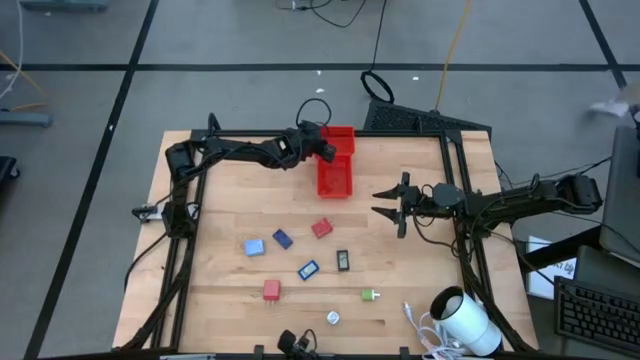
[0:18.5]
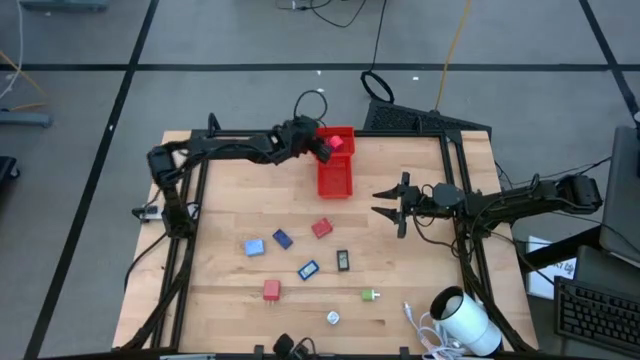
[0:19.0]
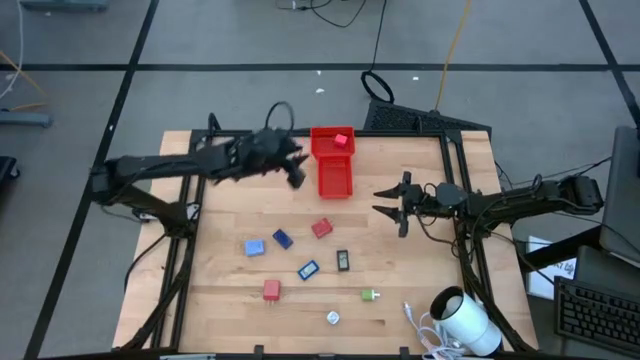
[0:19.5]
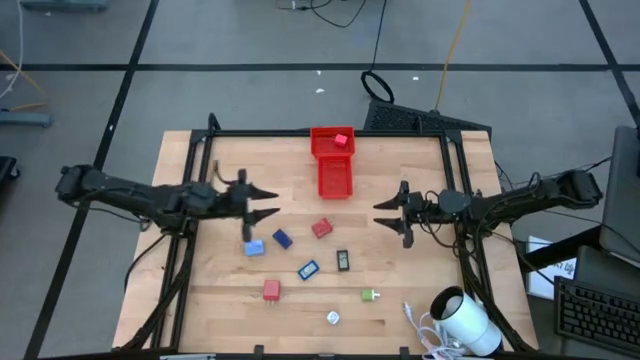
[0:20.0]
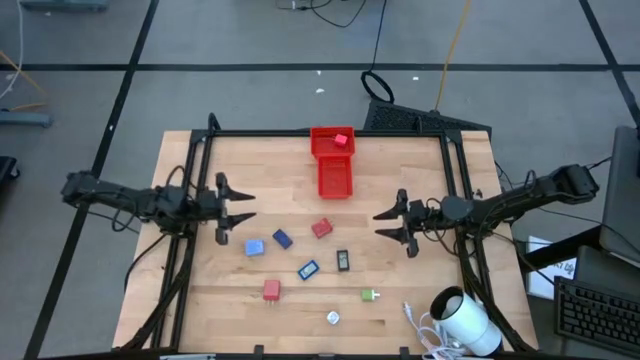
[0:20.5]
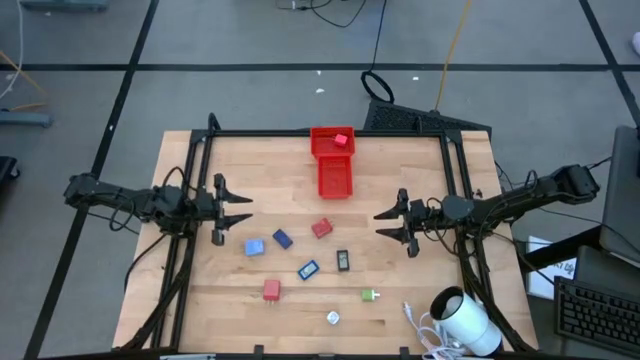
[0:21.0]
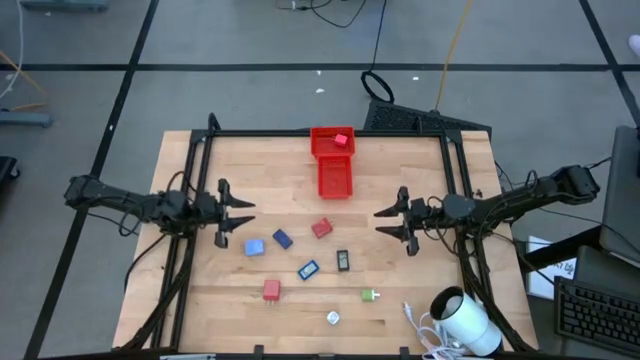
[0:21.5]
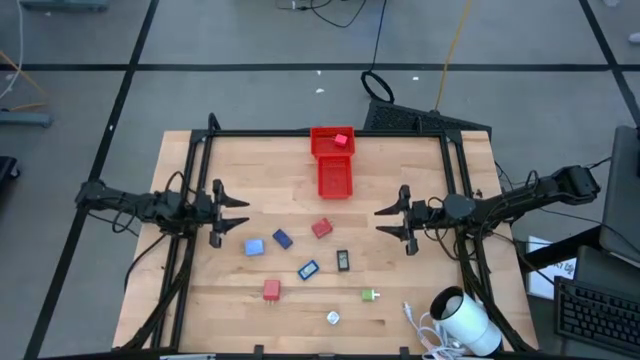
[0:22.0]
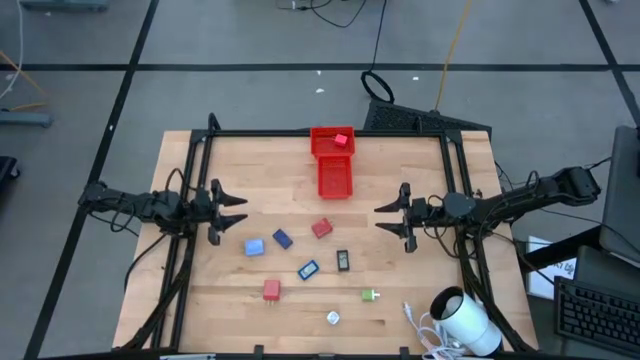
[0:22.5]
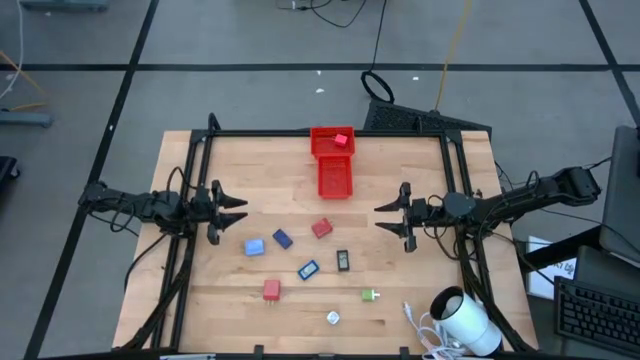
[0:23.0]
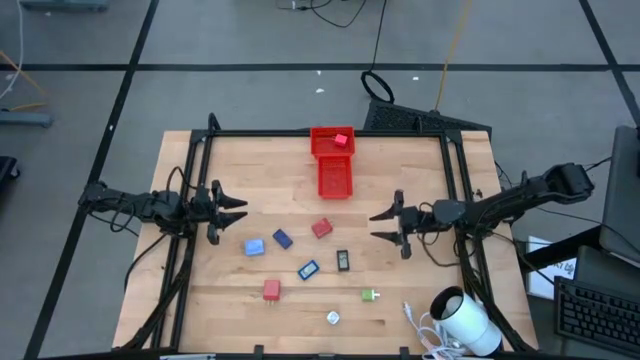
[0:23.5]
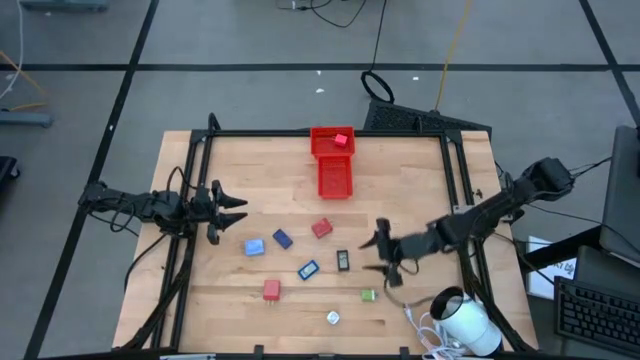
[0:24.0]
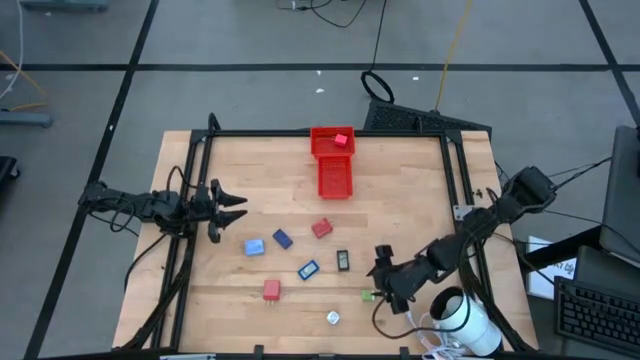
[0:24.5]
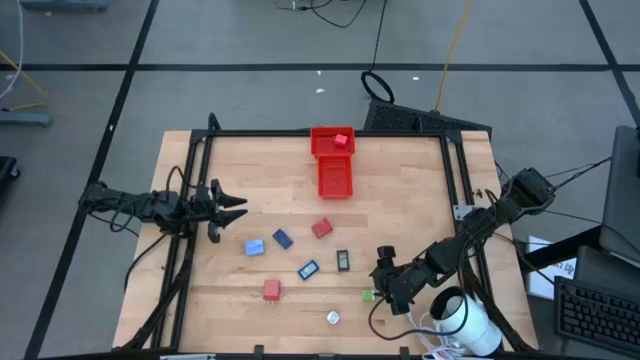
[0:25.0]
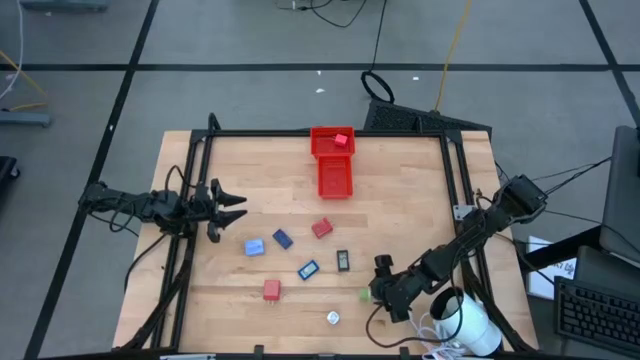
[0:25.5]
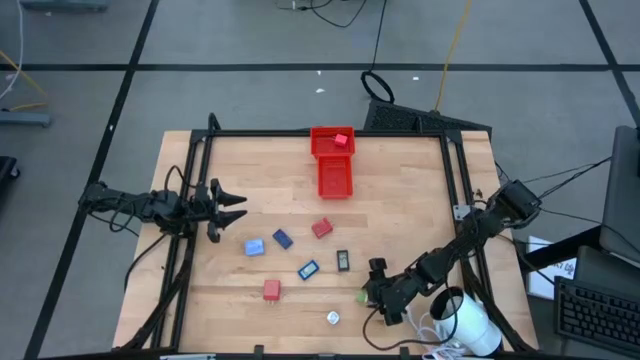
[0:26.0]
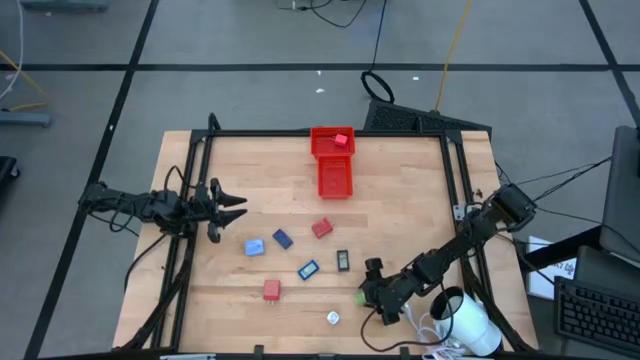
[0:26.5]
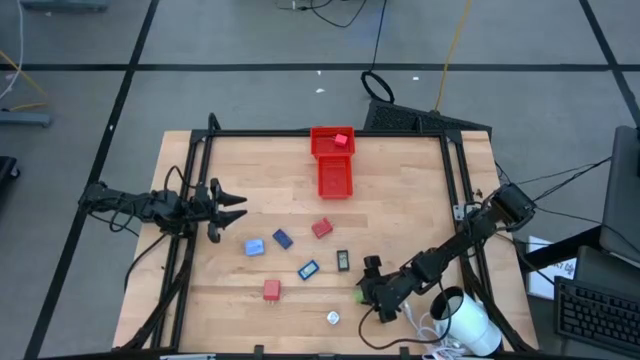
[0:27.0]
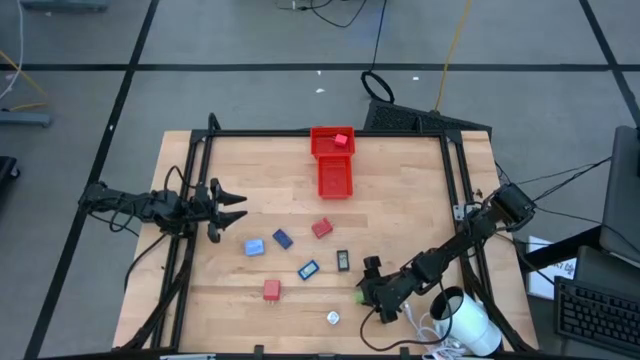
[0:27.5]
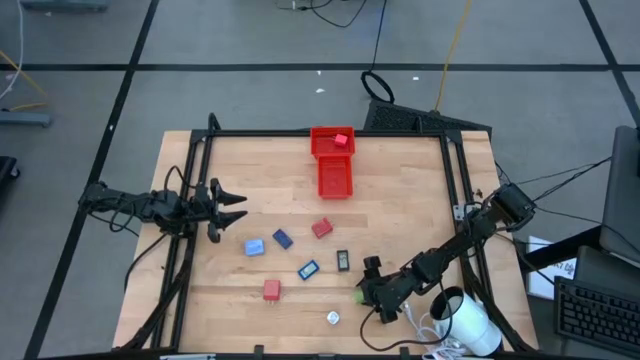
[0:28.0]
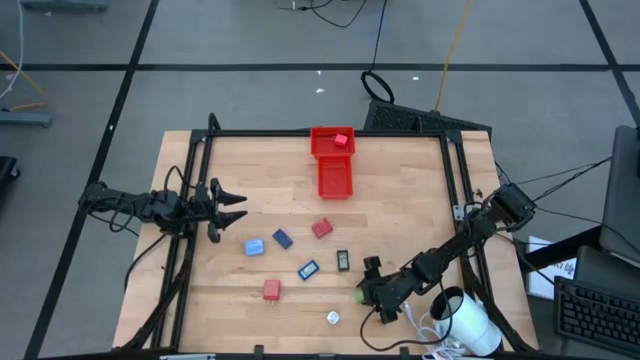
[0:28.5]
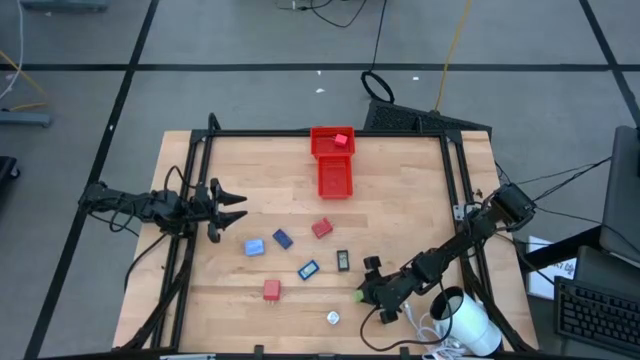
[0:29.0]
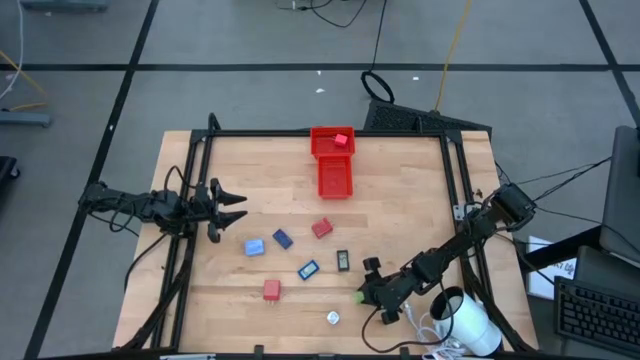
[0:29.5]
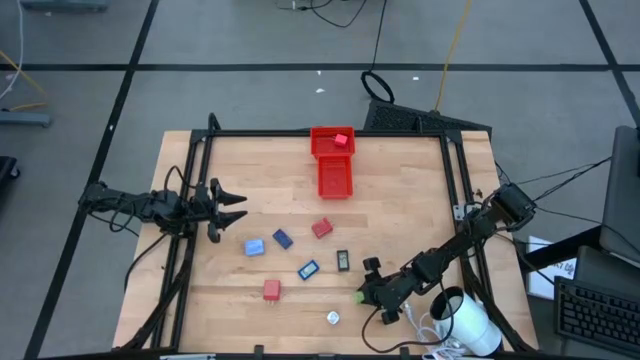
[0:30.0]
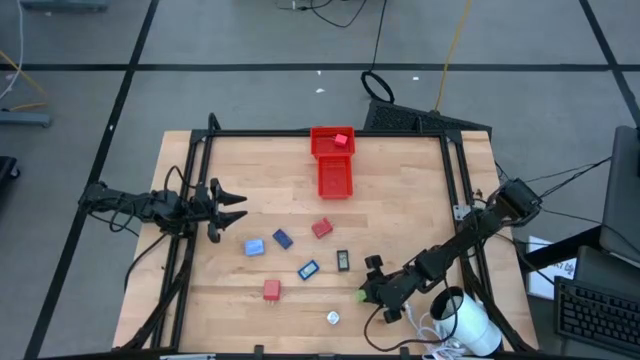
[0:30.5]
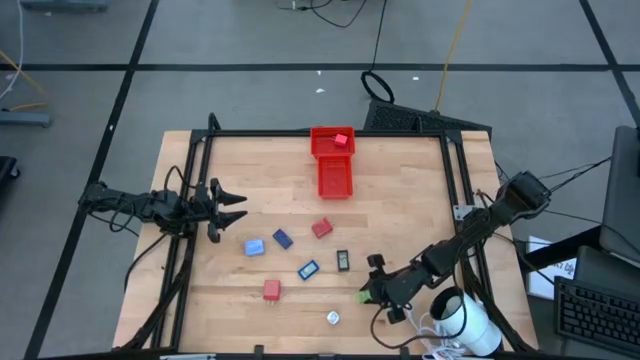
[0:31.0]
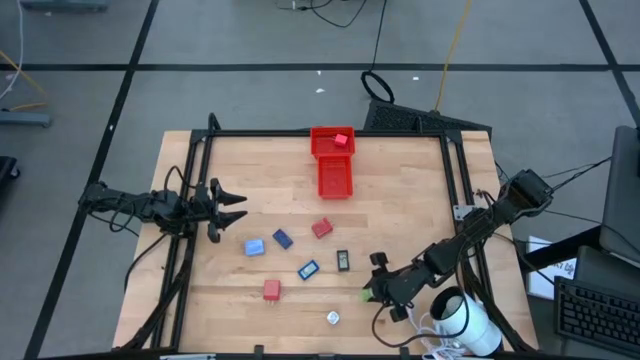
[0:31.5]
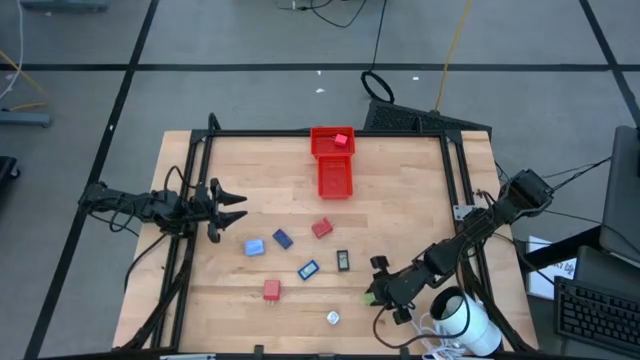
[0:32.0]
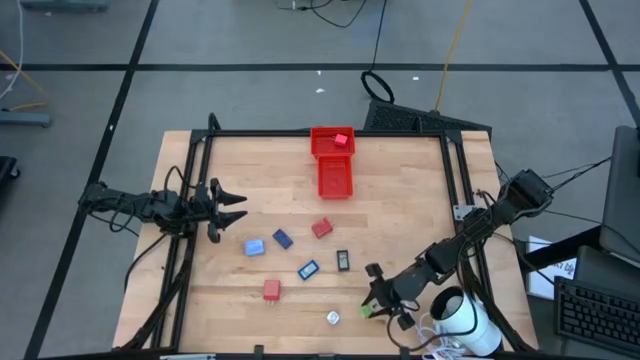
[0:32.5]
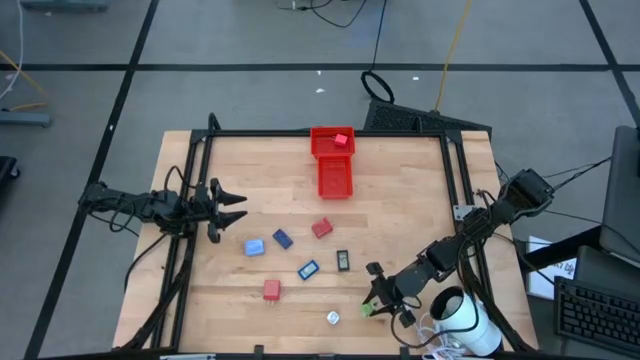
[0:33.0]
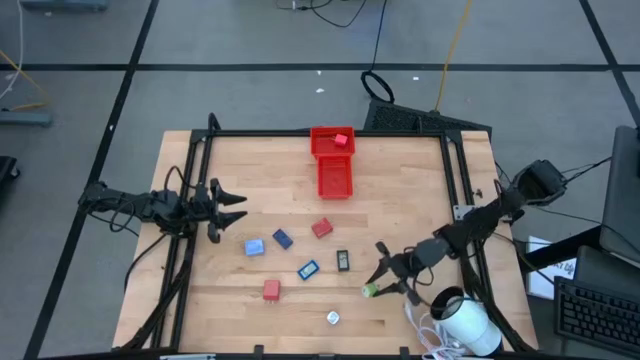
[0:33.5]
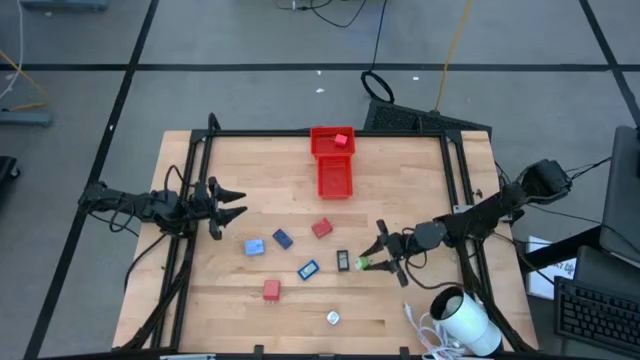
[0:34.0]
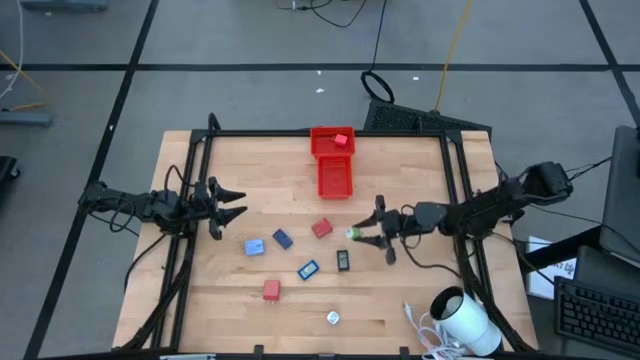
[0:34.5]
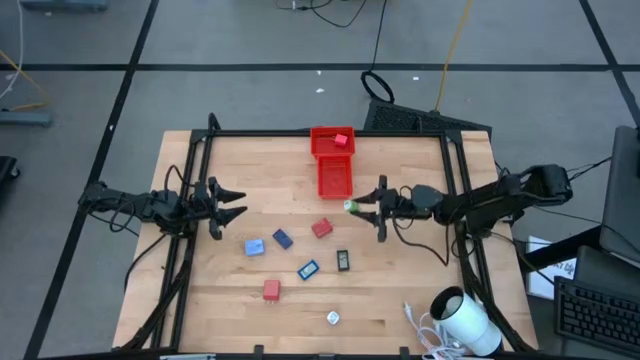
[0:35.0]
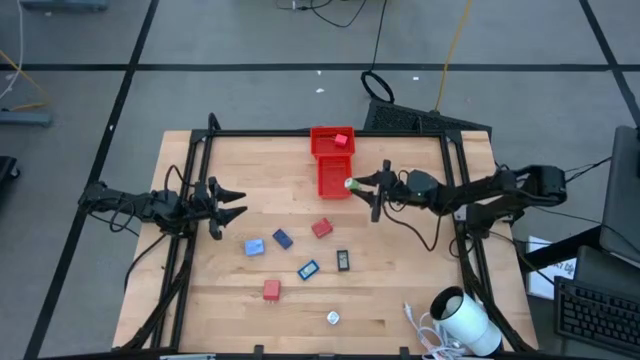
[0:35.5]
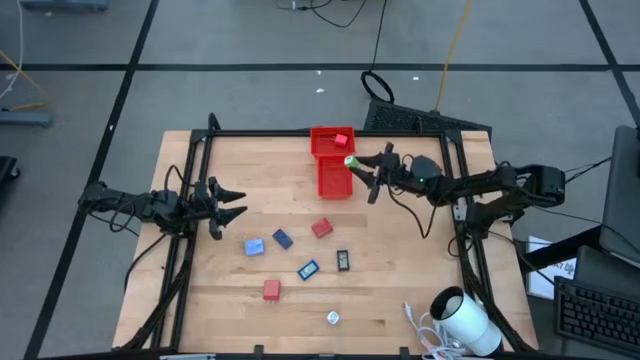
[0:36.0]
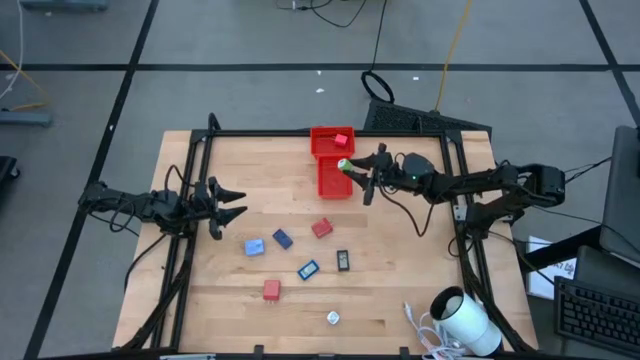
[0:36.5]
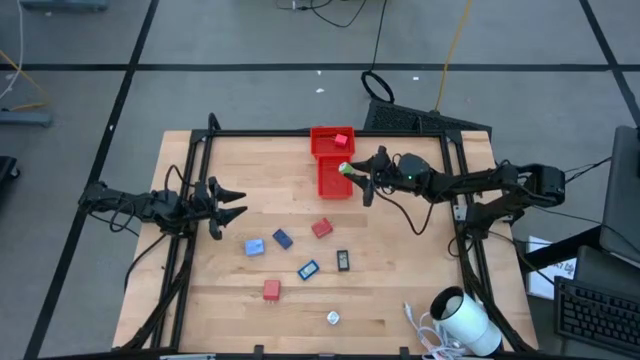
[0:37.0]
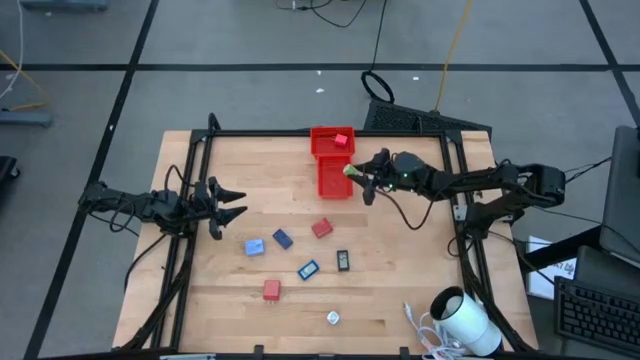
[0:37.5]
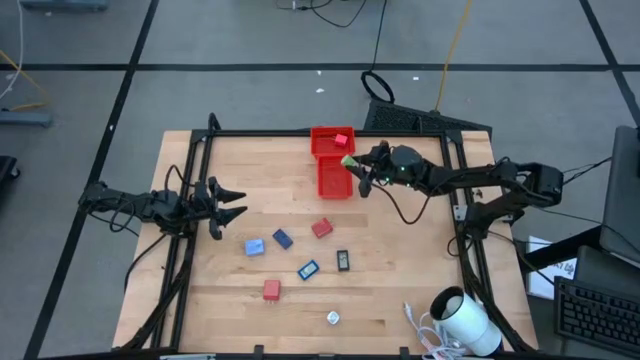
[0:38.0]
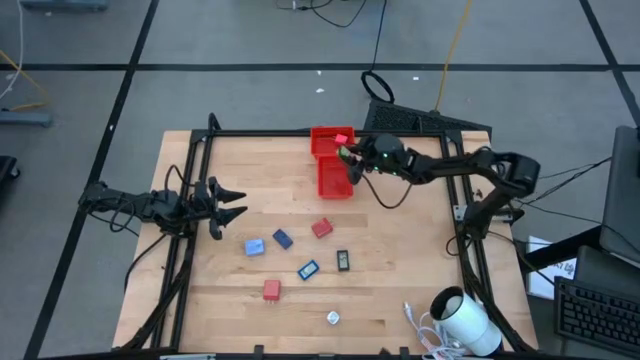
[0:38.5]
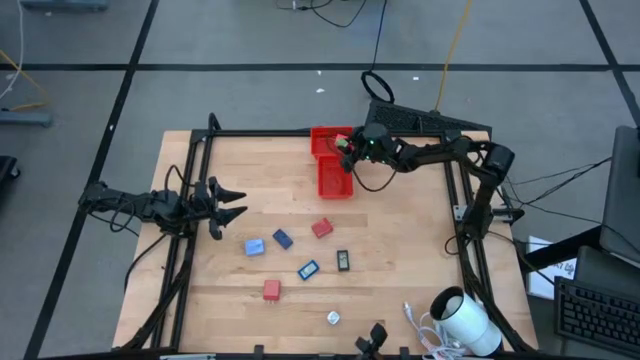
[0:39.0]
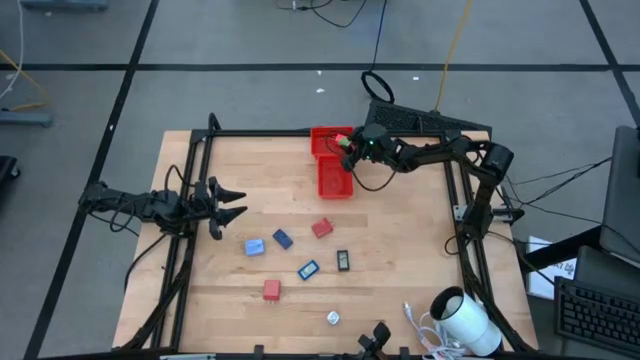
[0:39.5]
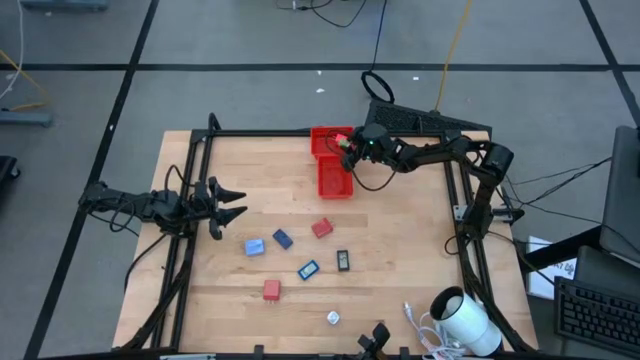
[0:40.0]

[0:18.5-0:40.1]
Task: Pick & Place Office items
Put the green charger adapter into the top red bin
